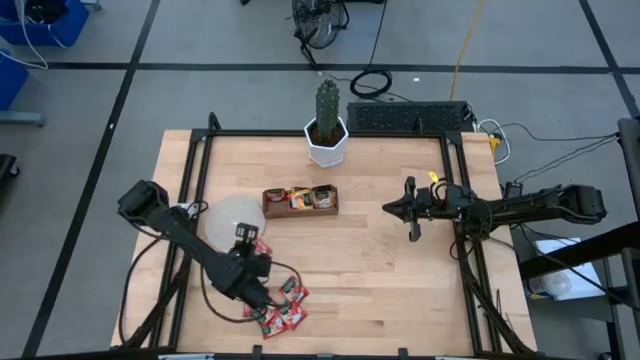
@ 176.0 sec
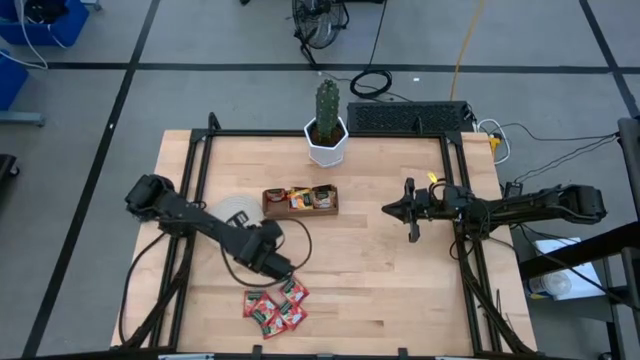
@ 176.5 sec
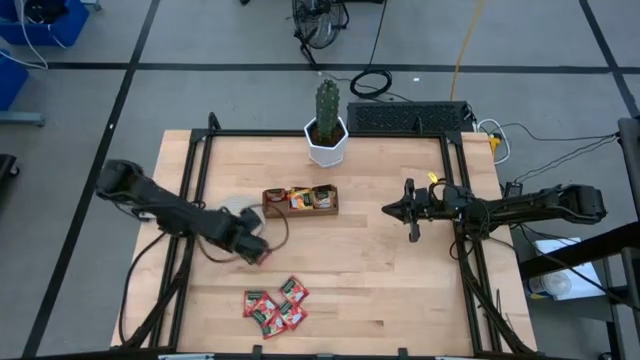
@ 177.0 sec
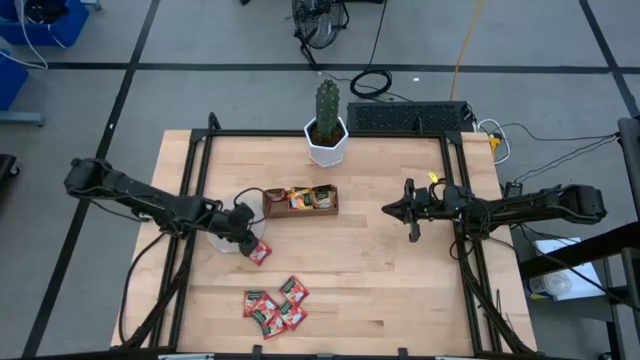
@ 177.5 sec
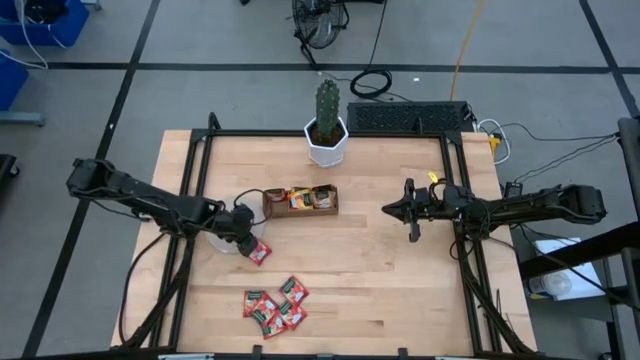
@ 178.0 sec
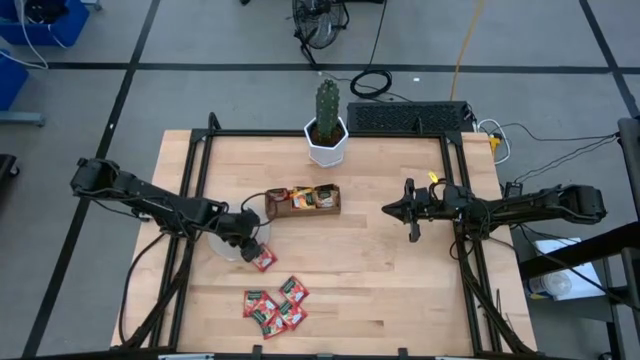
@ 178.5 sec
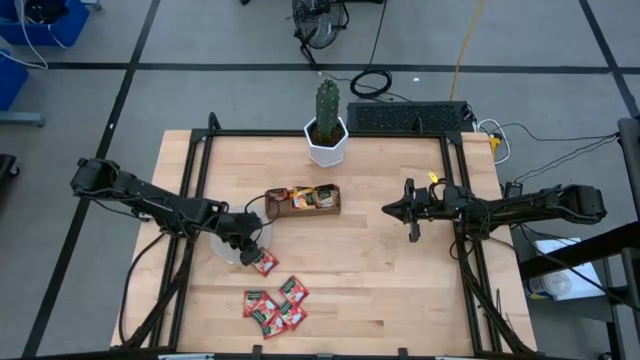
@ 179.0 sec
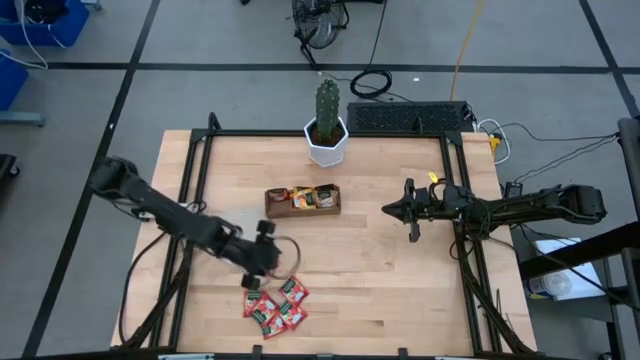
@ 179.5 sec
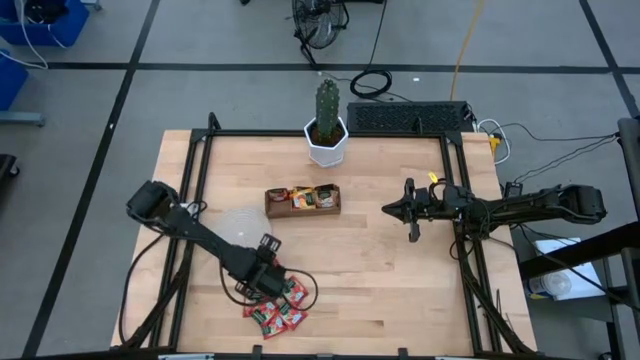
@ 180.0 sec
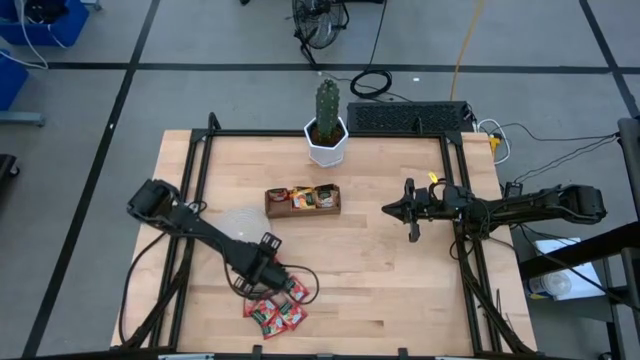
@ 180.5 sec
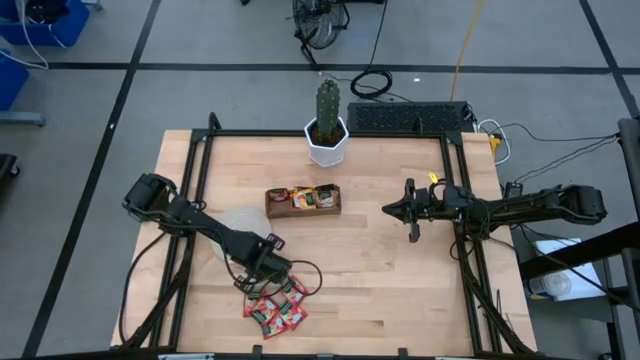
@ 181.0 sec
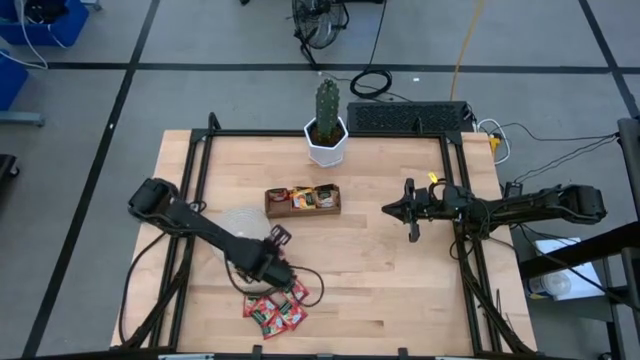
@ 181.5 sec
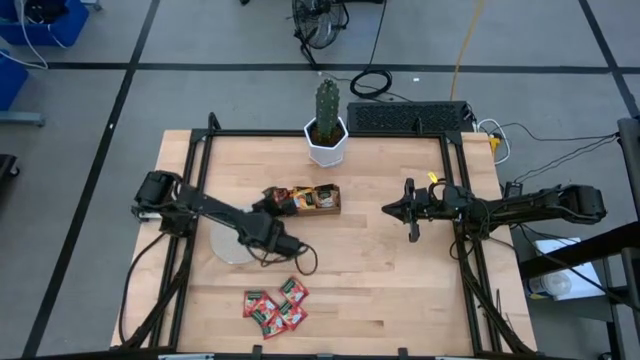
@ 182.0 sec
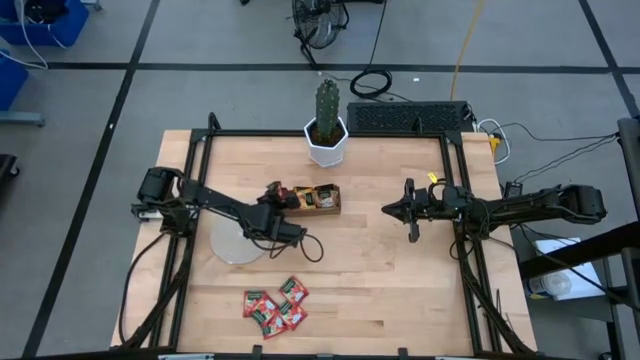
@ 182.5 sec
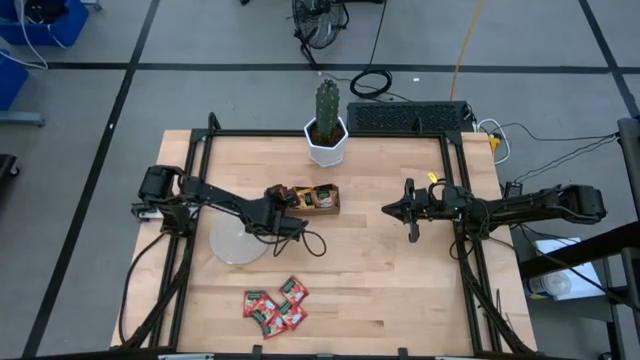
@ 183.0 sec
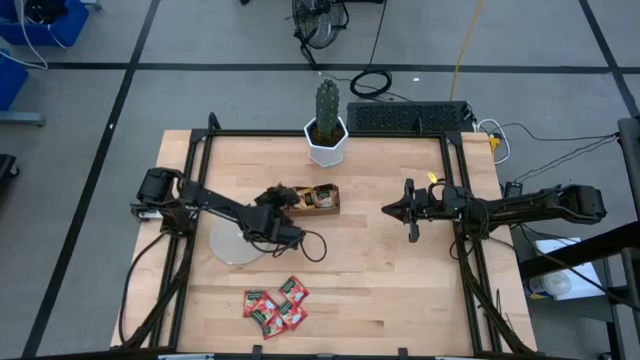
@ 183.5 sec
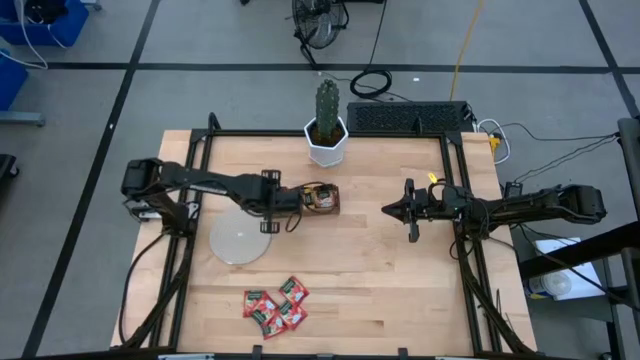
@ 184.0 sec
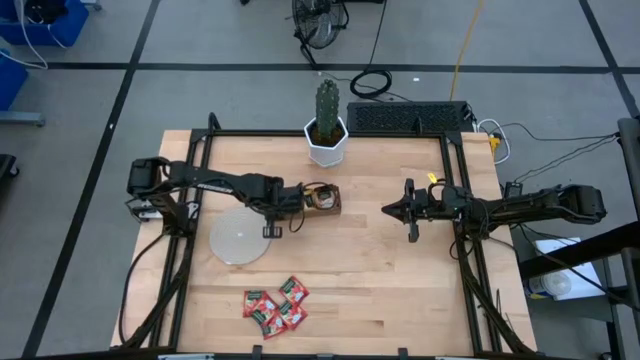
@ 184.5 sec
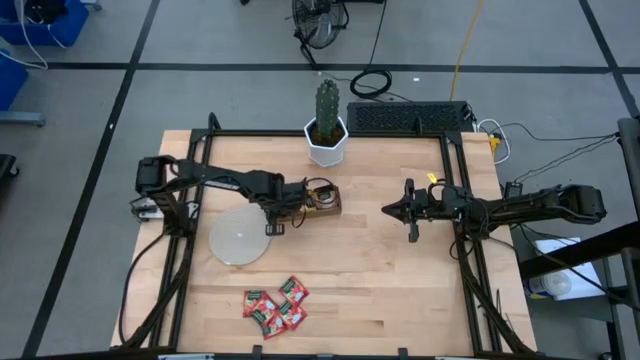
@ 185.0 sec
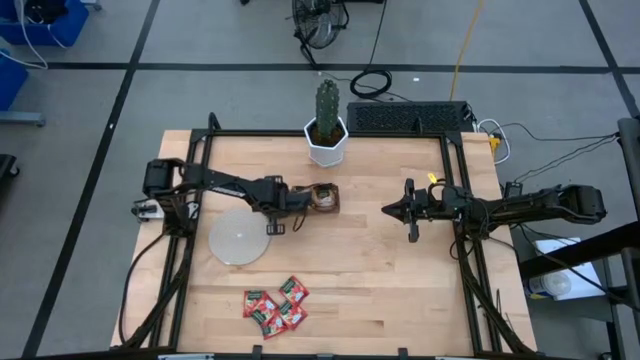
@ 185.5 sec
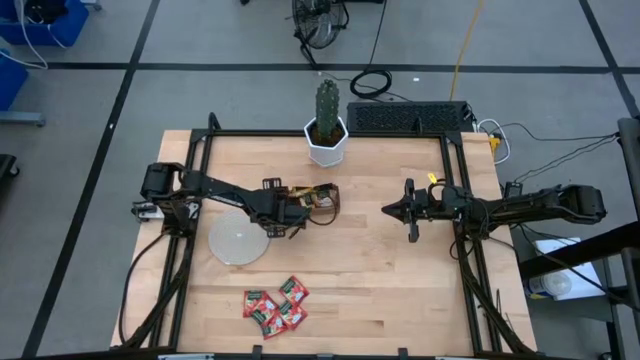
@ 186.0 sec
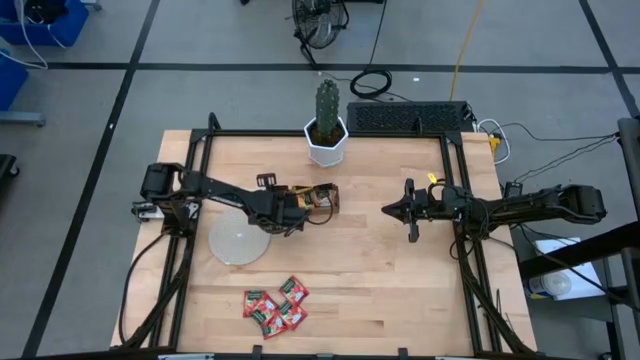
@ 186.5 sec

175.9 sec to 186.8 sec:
Task: Pick & Place Tea
Put the red tea bag into the left section of the wooden organizer

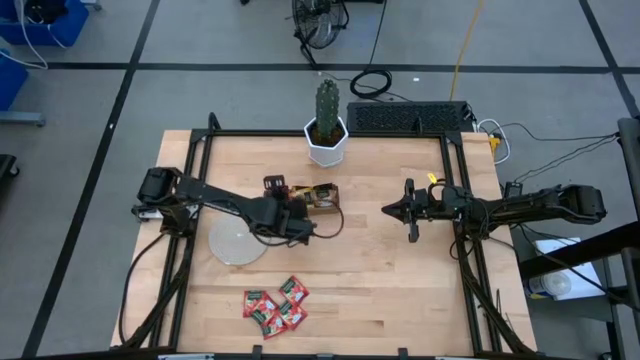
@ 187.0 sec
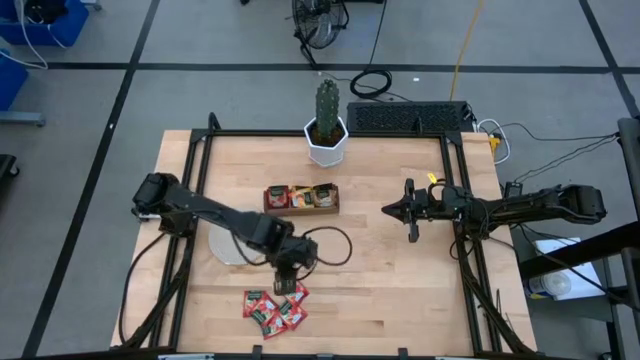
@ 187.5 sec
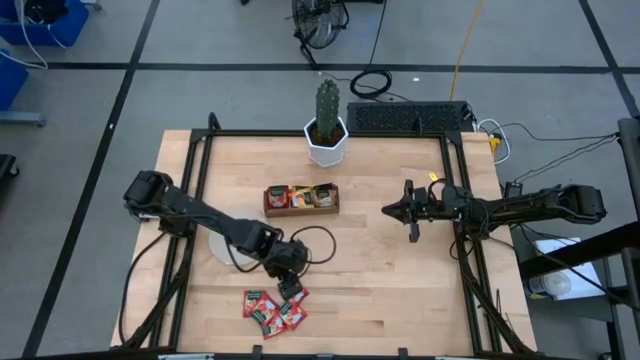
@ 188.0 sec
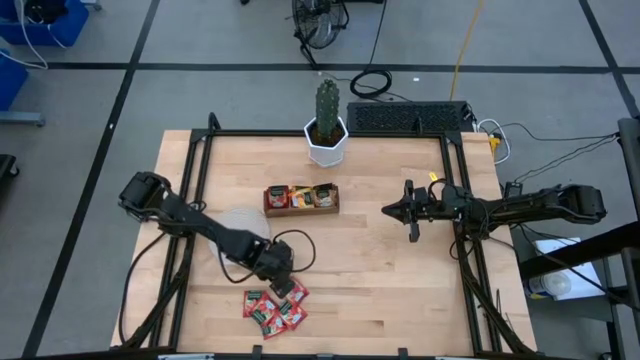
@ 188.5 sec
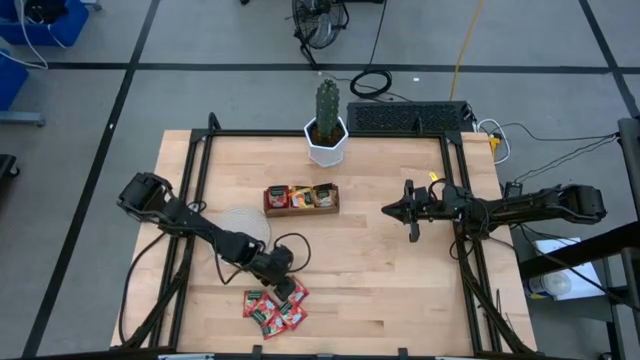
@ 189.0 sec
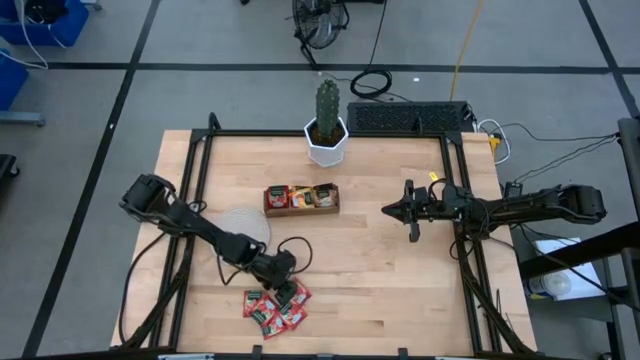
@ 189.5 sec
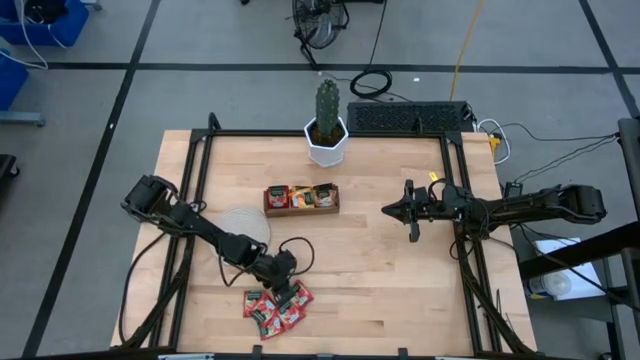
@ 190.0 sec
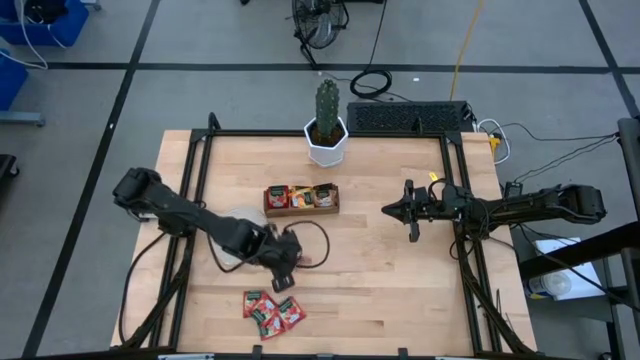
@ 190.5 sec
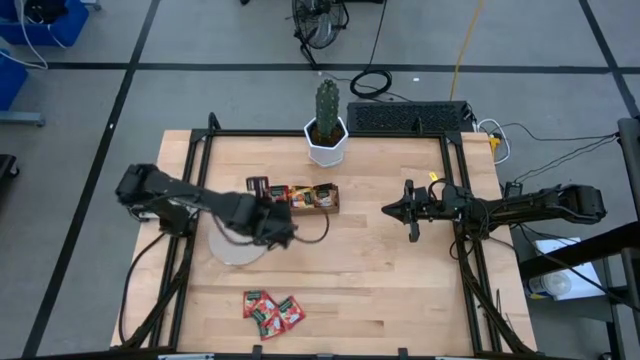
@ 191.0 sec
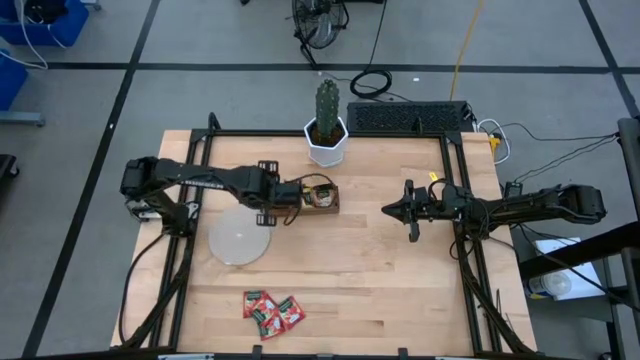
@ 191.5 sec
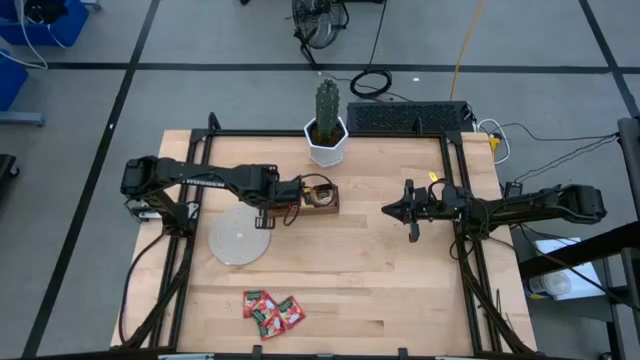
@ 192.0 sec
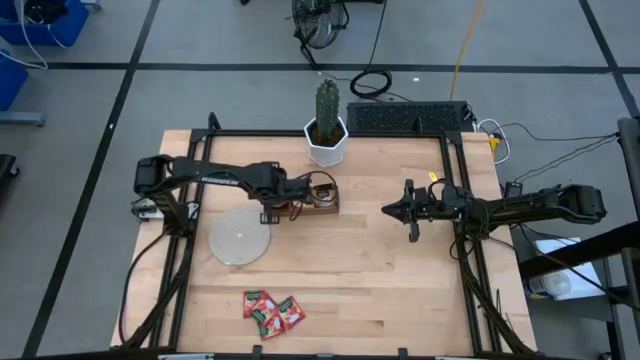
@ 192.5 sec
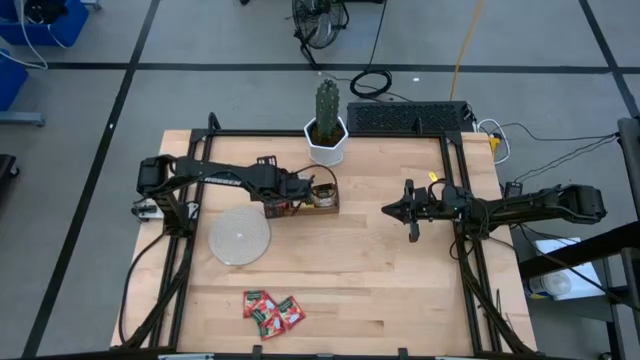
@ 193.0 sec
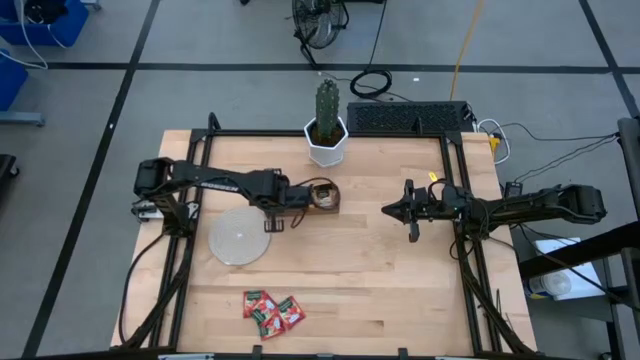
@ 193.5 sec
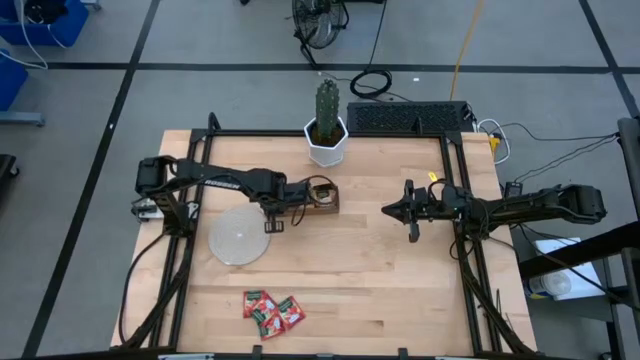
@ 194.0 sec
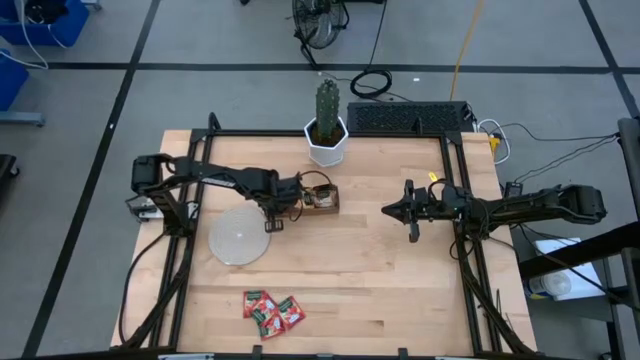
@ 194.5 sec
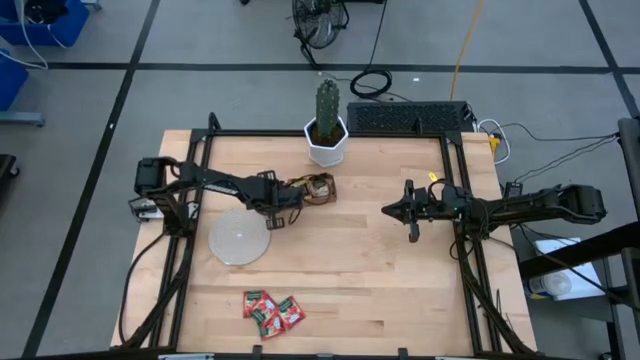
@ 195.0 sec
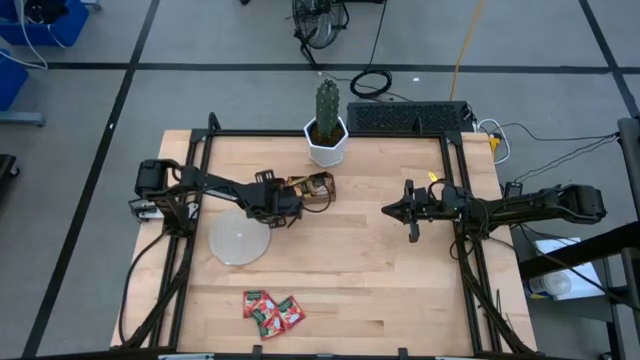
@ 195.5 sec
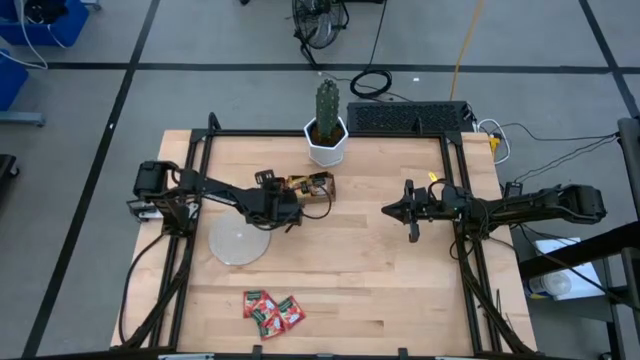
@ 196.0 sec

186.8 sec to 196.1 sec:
Put the red tea bag into the left section of the wooden organizer

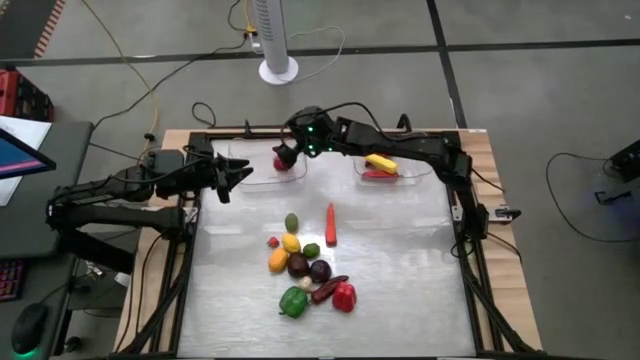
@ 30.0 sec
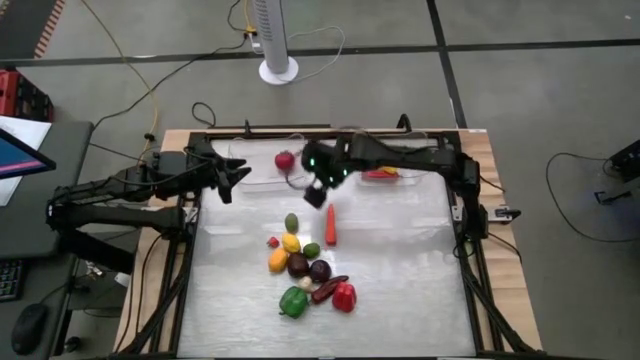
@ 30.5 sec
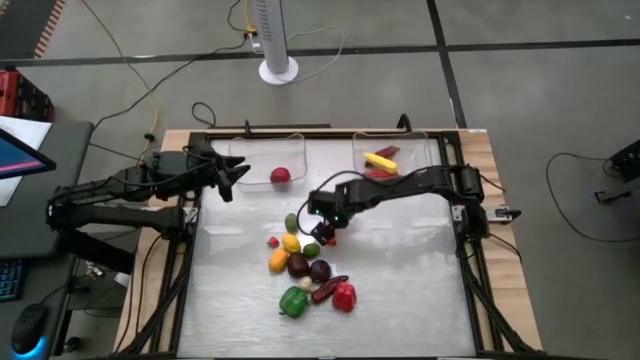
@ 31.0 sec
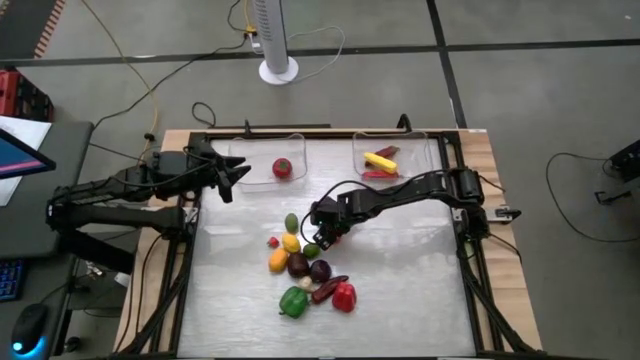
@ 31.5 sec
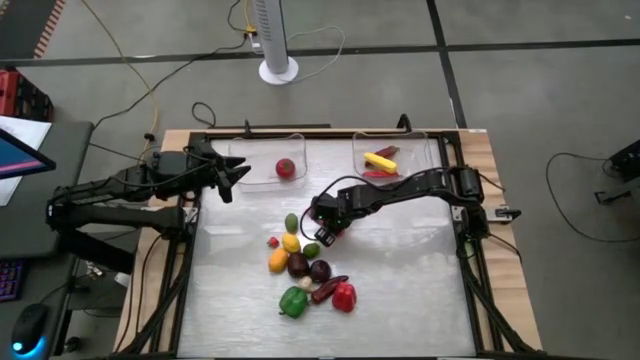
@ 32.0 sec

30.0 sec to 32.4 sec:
Task: Sort produce into baskets
Put the orange carrot into the right transparent bin
